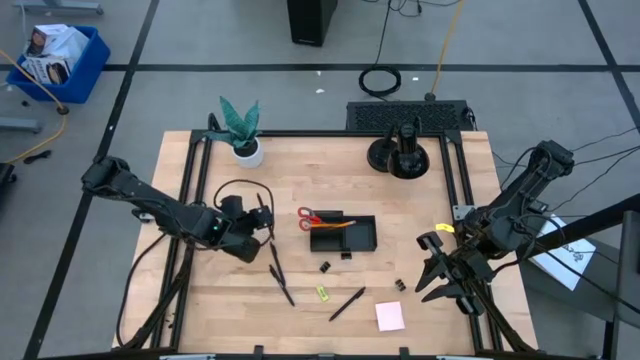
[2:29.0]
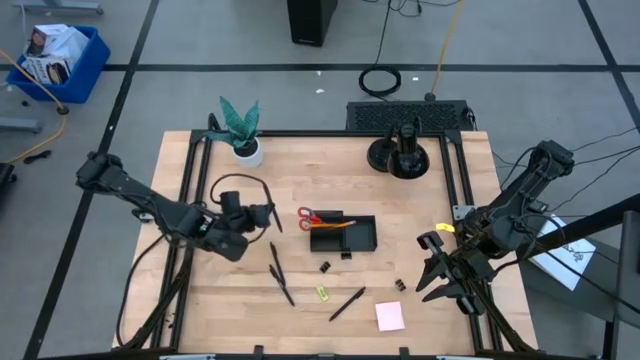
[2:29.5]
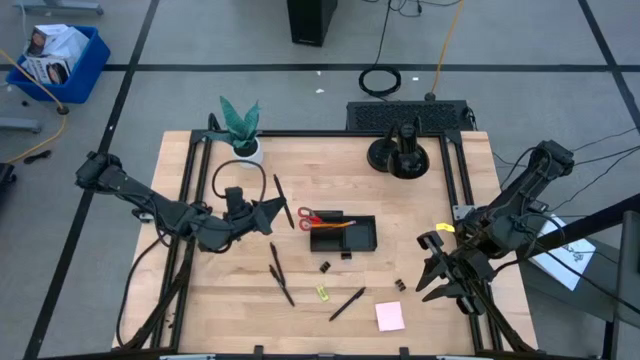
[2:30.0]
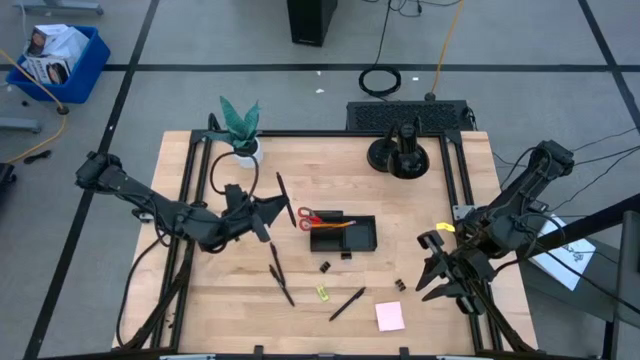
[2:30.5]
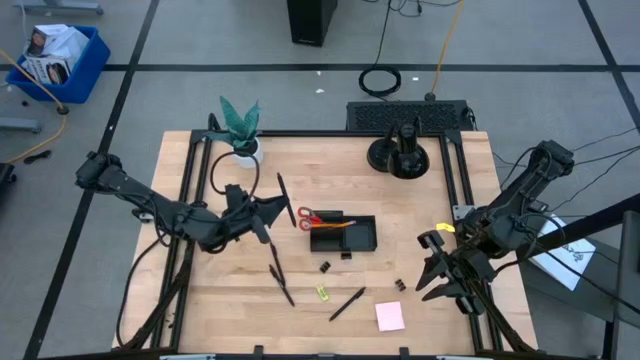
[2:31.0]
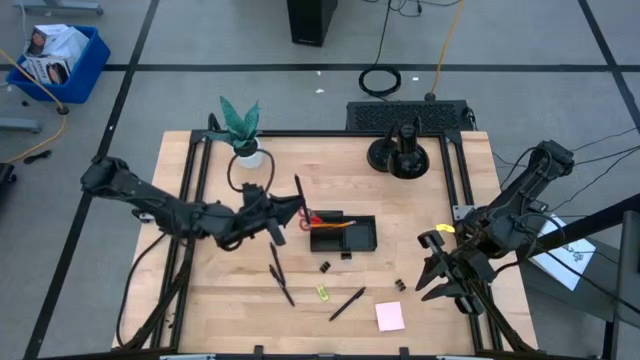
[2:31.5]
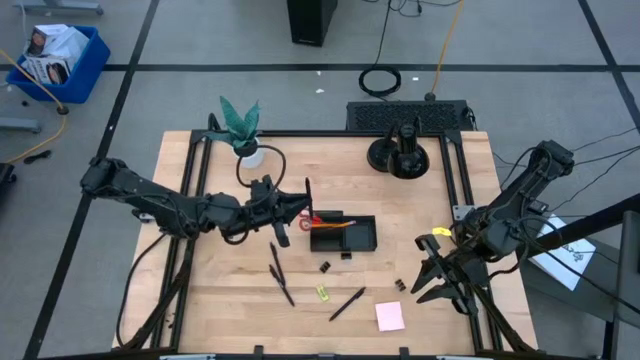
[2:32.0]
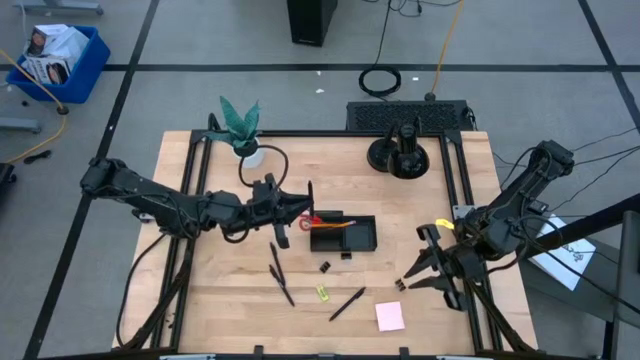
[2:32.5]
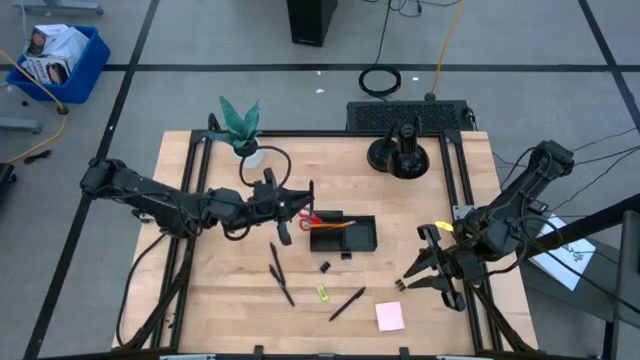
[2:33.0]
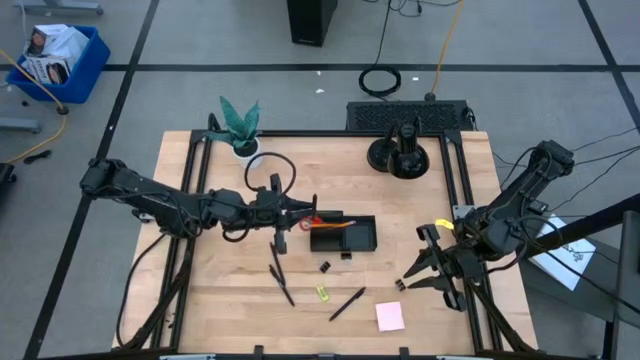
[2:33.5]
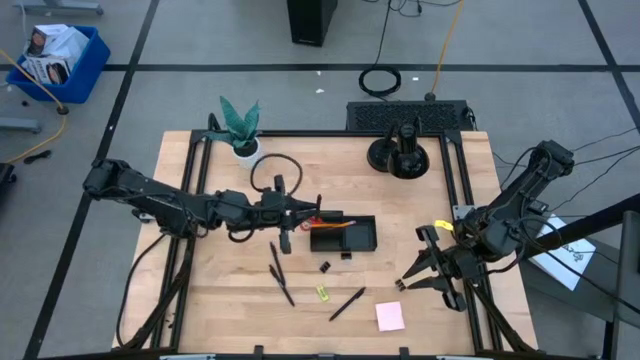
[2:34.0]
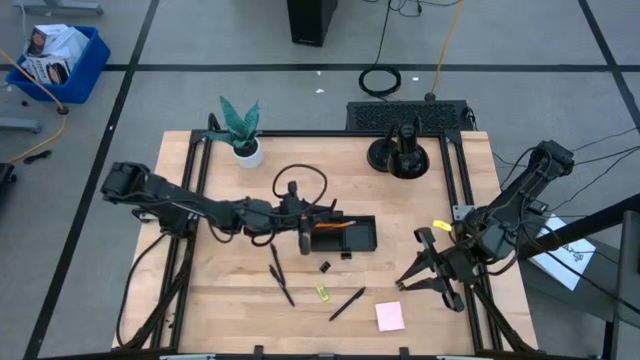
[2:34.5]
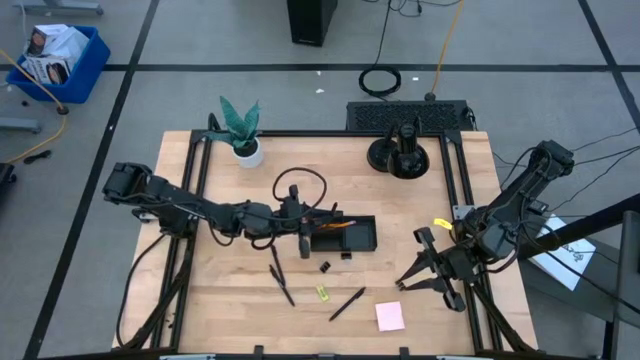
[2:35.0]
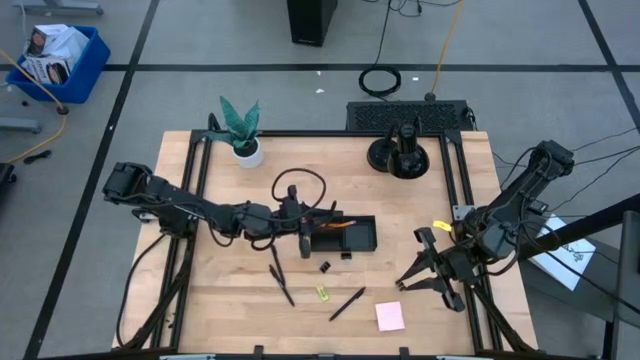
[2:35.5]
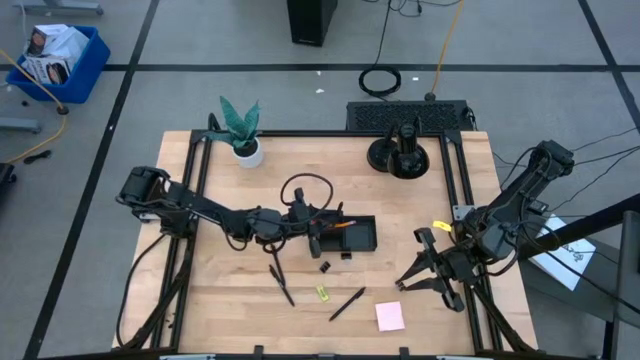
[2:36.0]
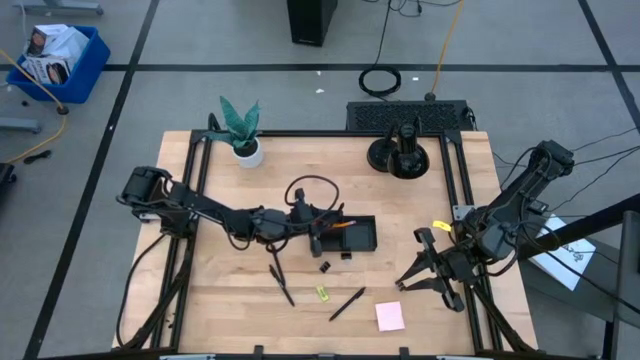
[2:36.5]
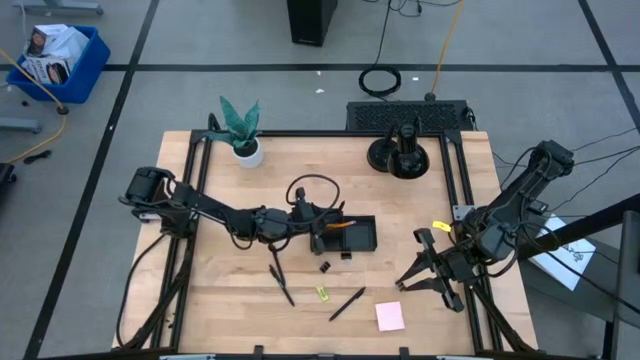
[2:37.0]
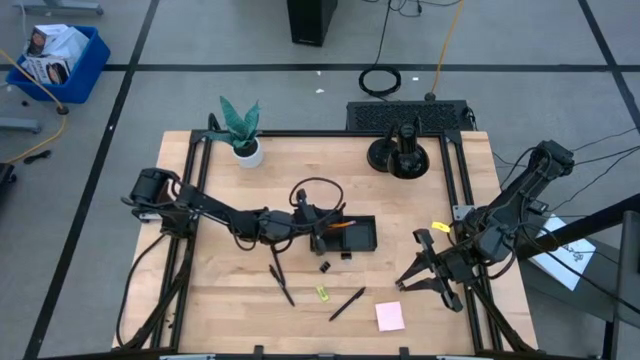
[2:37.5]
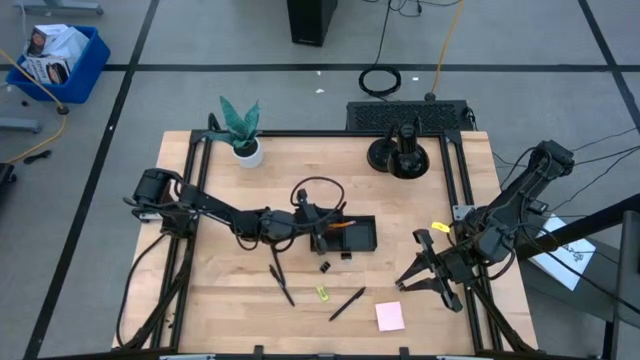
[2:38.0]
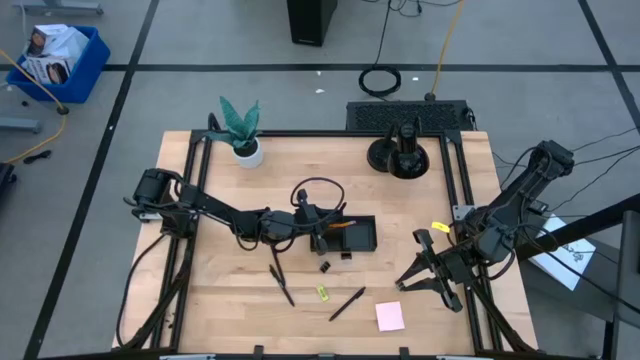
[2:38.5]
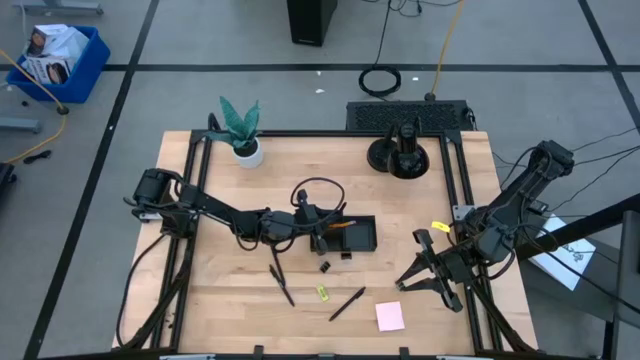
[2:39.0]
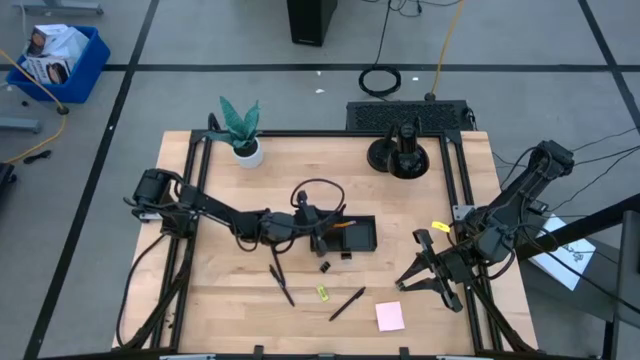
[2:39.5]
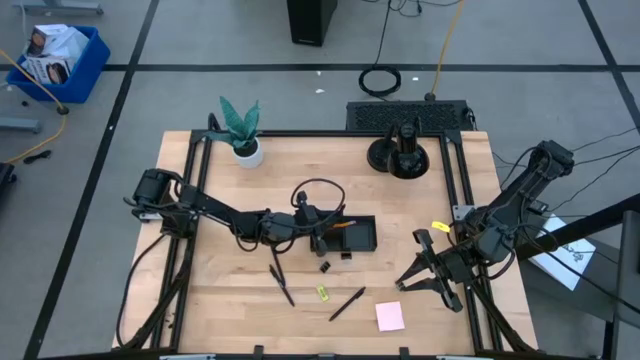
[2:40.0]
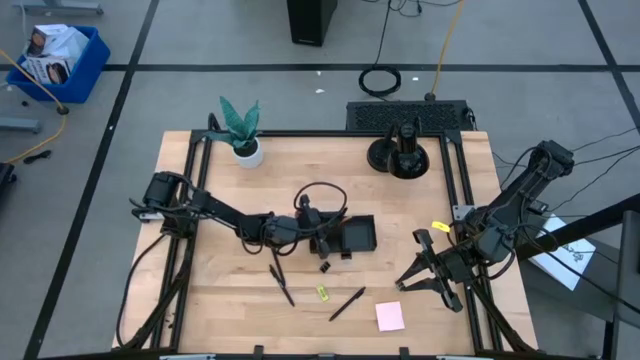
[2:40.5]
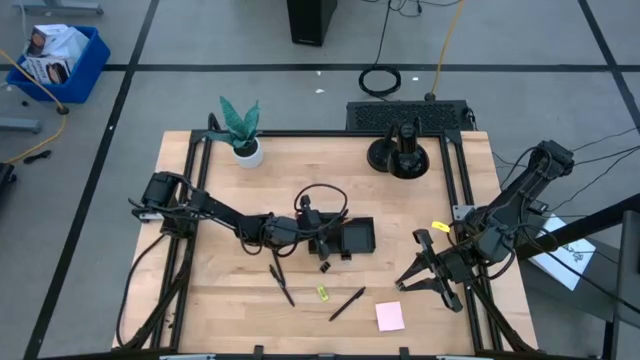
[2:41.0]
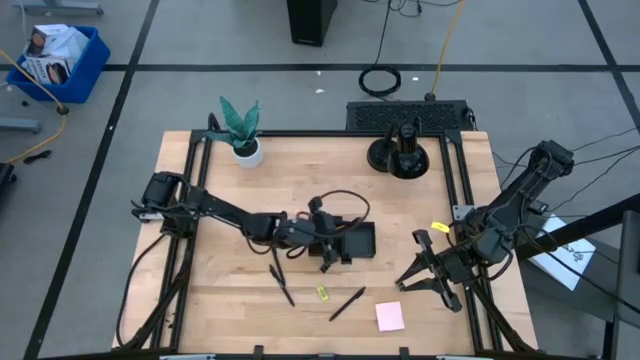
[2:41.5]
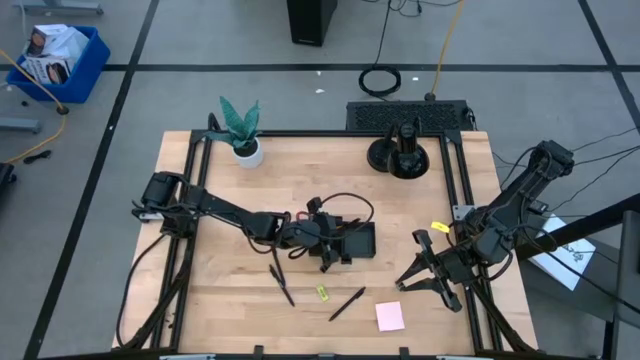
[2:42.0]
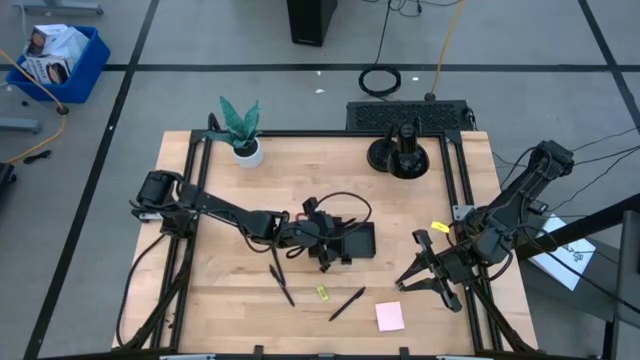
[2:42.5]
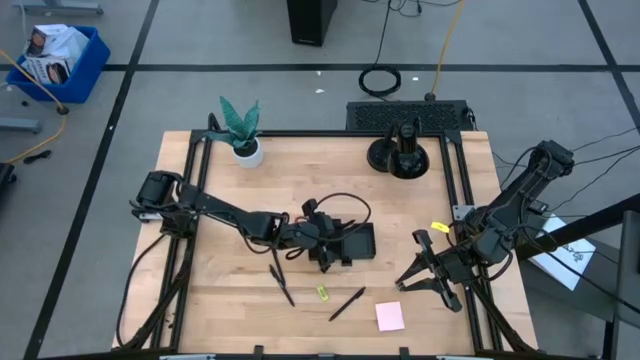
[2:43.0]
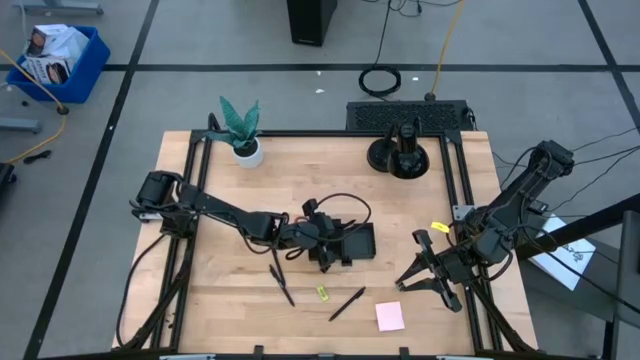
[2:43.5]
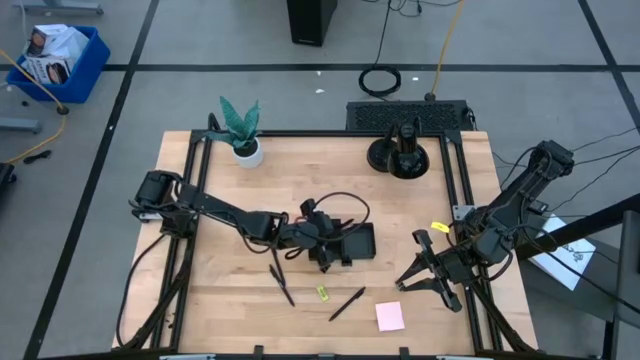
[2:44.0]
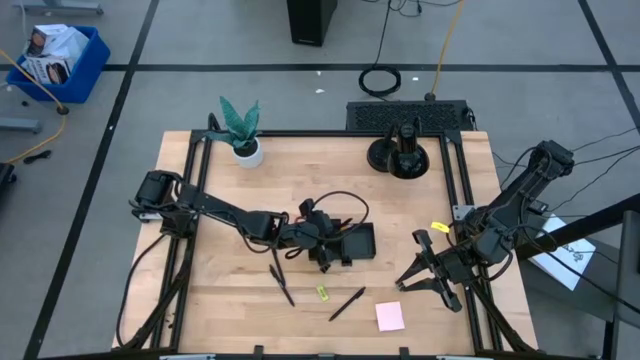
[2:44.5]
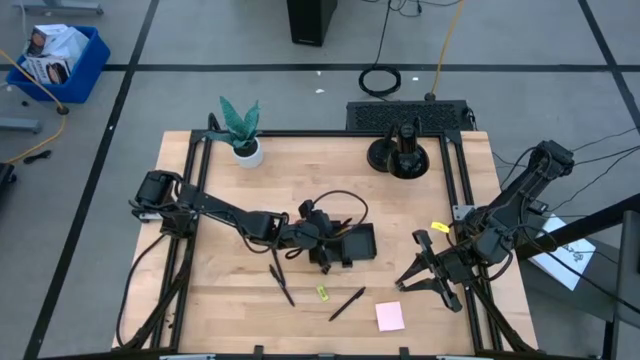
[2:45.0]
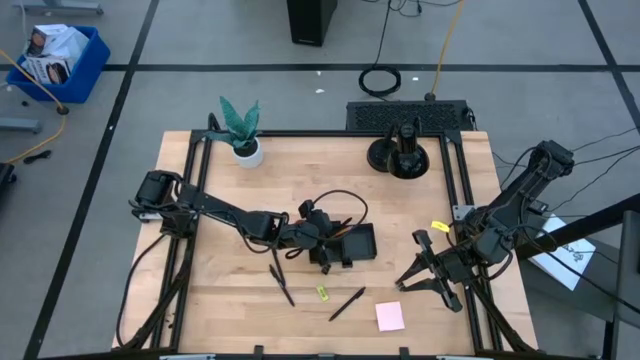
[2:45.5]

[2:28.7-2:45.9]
Task: Pick and place office supplies into organizer
Put the top left black pen into the black desk organizer

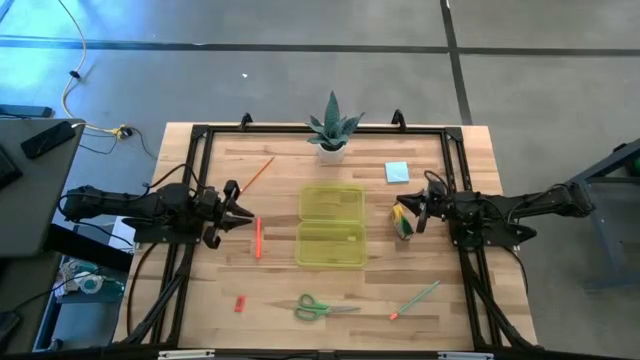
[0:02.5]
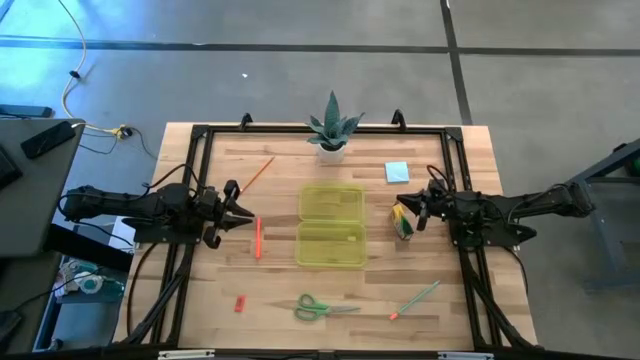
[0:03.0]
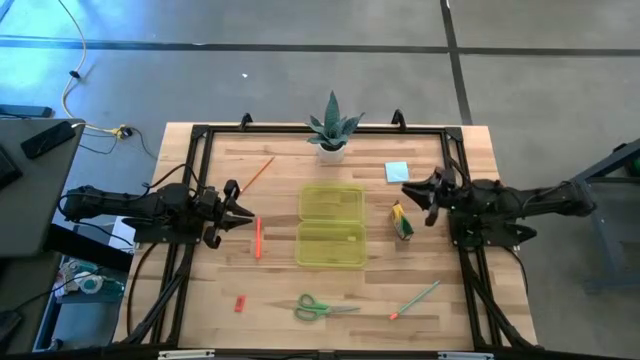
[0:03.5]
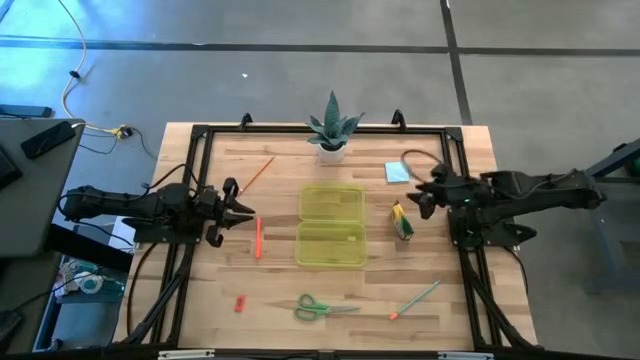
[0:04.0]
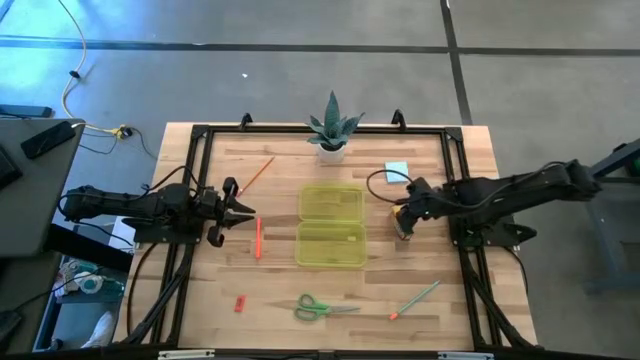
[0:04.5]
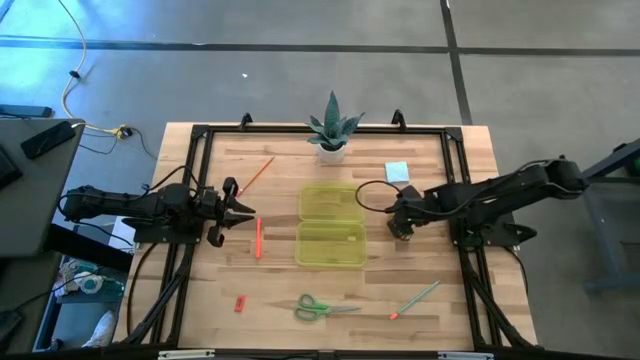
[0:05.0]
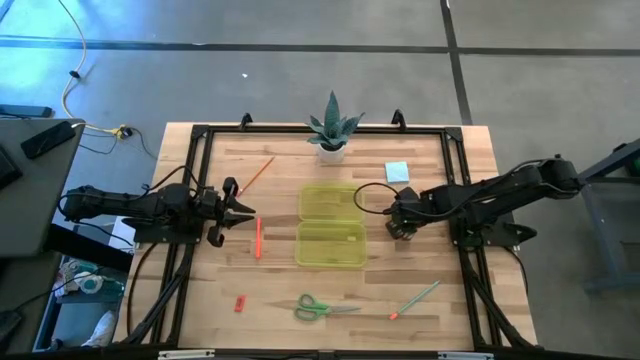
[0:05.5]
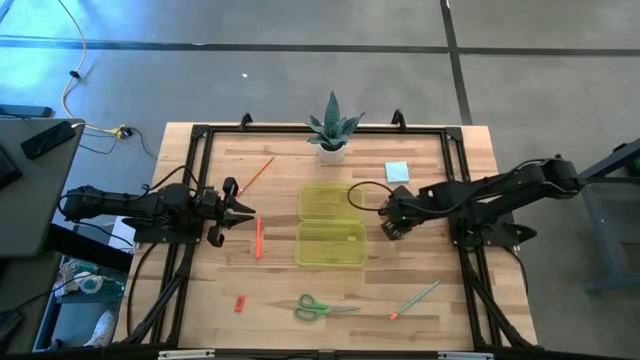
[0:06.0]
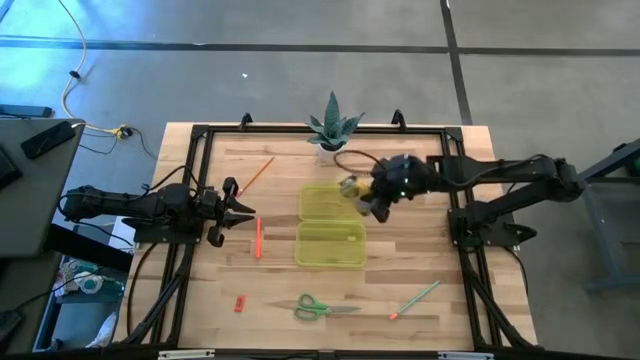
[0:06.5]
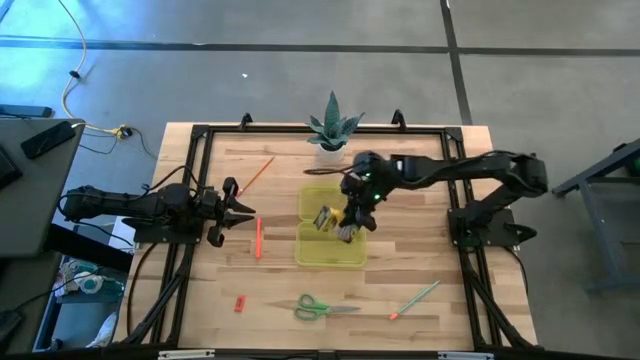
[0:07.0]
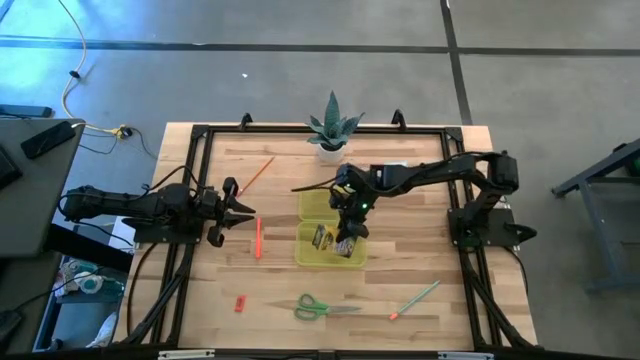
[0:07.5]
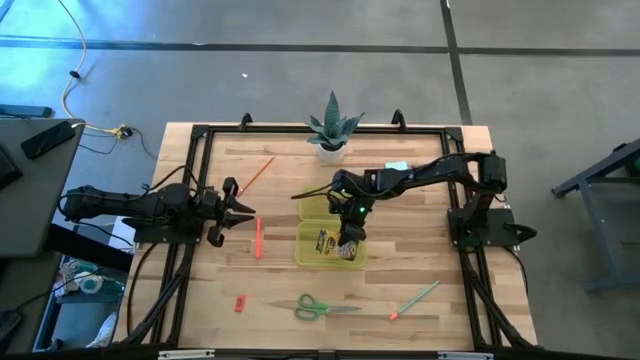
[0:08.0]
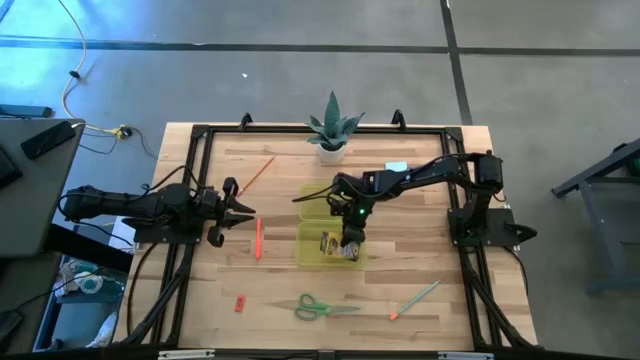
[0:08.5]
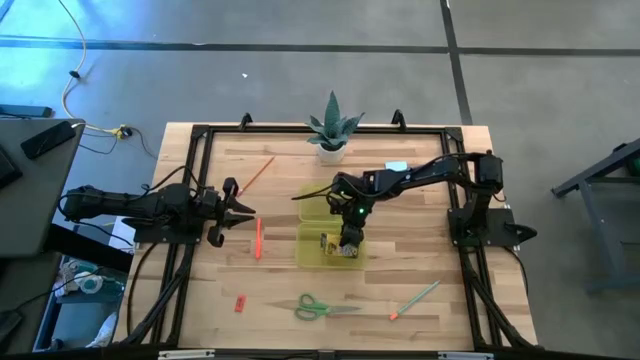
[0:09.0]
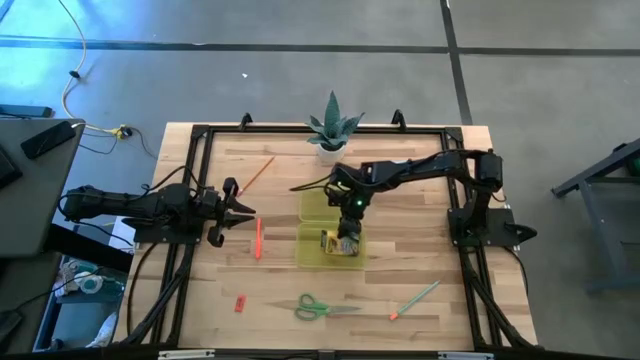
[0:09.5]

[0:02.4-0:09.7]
Task: Pack school essentials
Put the box of crayons into the yellow school supply box
